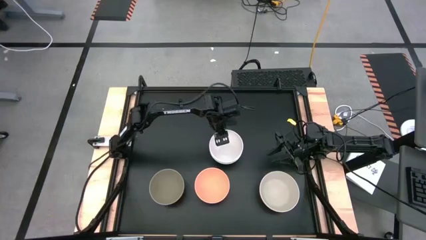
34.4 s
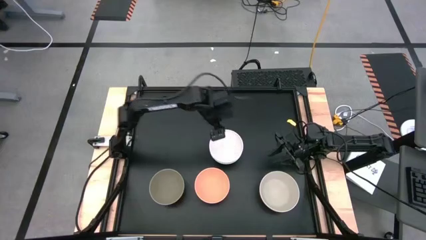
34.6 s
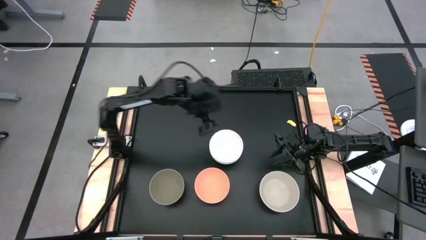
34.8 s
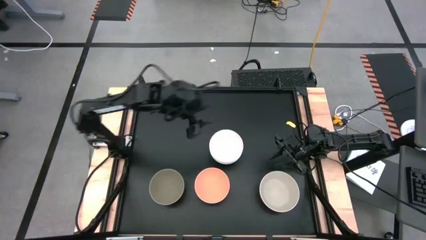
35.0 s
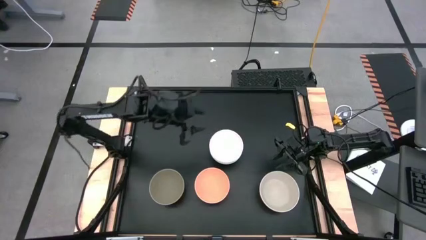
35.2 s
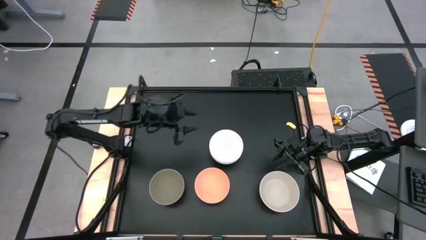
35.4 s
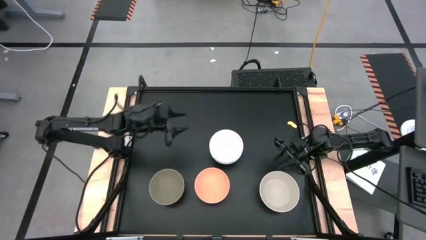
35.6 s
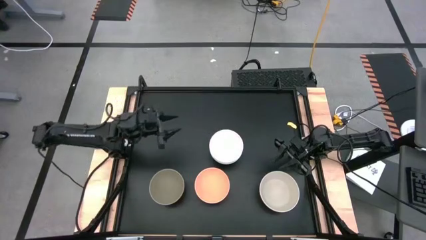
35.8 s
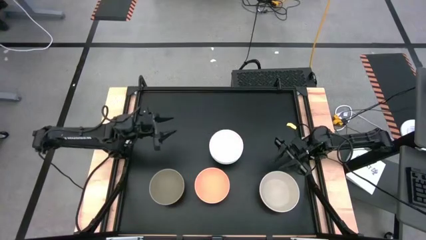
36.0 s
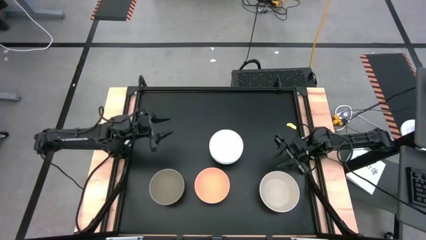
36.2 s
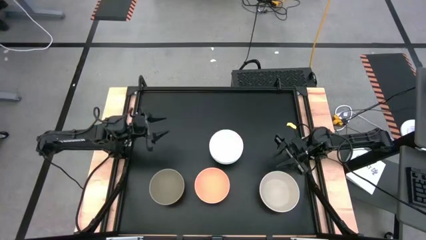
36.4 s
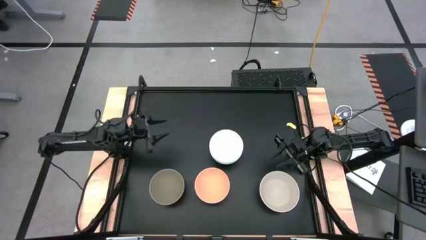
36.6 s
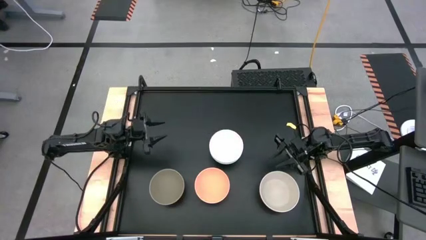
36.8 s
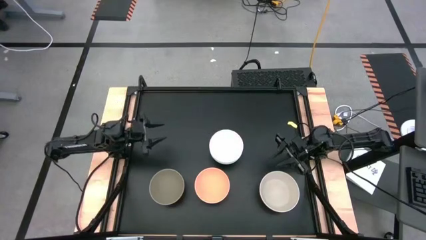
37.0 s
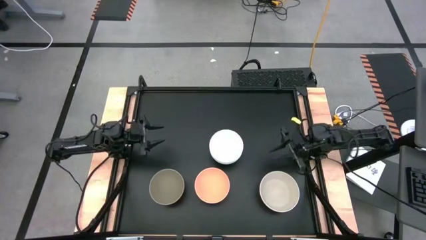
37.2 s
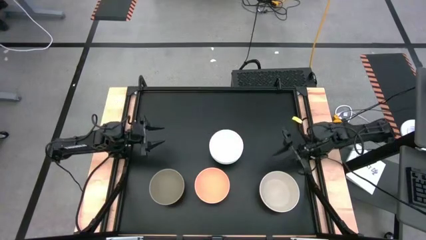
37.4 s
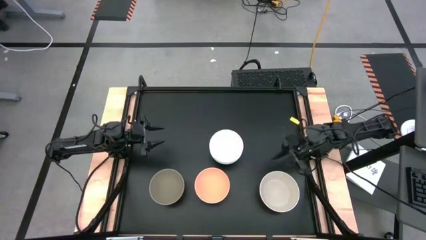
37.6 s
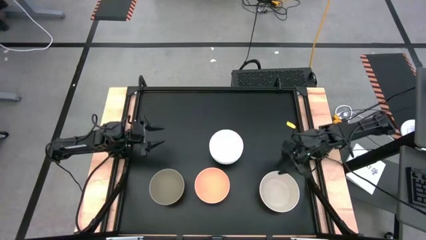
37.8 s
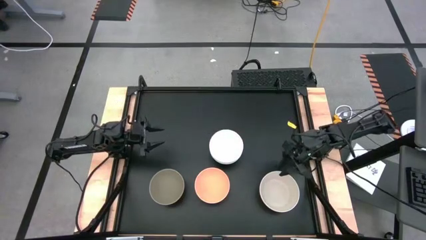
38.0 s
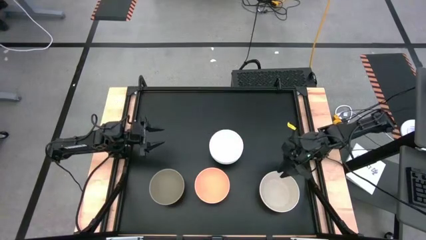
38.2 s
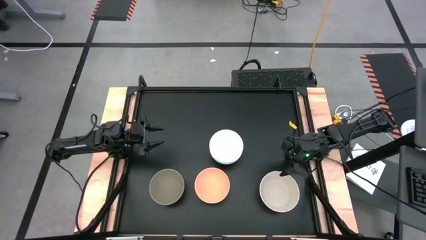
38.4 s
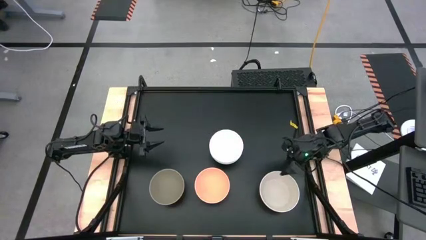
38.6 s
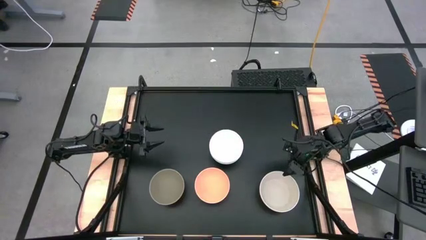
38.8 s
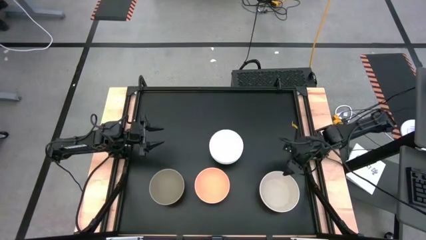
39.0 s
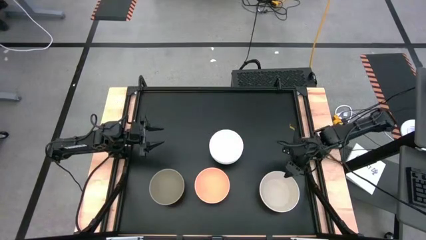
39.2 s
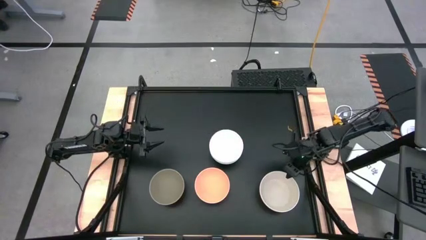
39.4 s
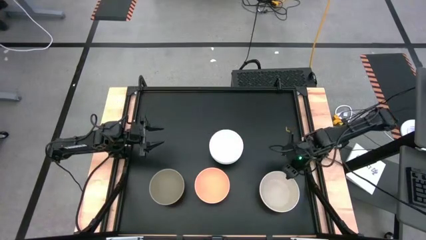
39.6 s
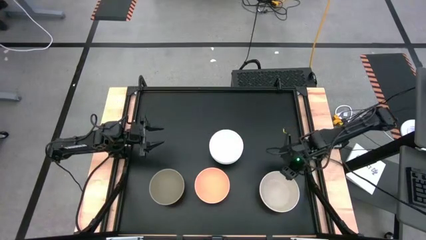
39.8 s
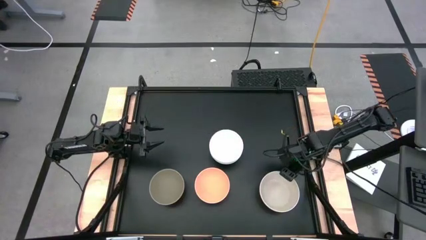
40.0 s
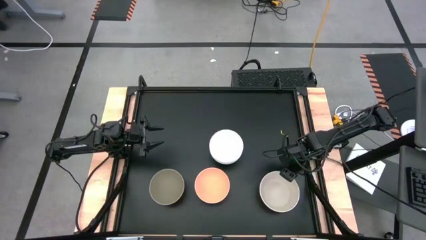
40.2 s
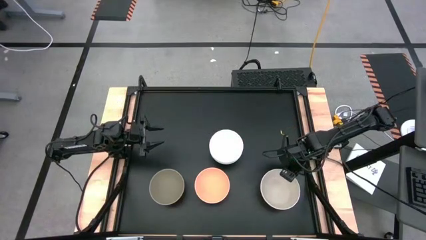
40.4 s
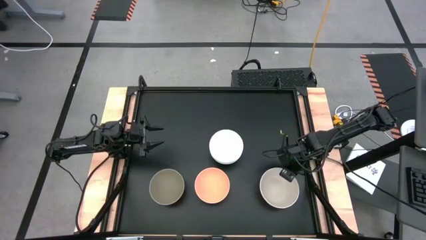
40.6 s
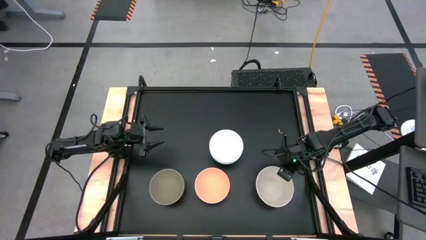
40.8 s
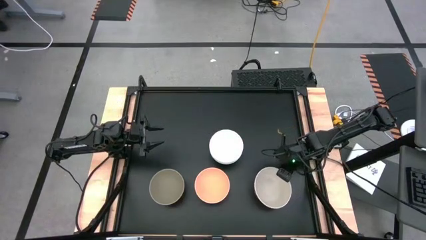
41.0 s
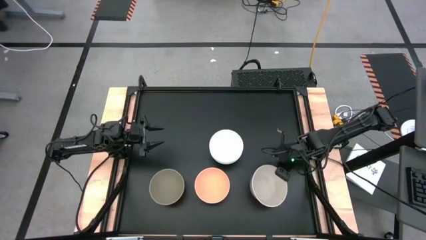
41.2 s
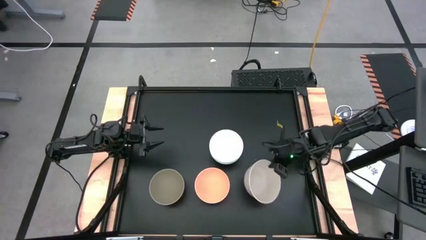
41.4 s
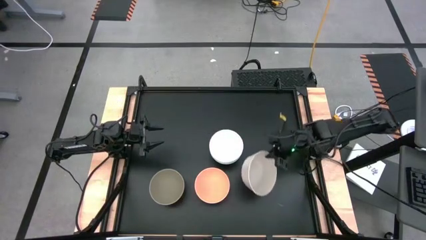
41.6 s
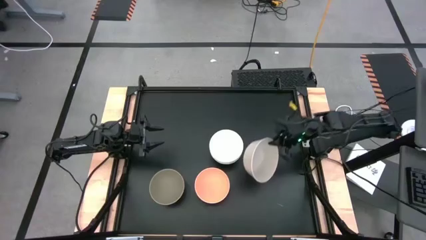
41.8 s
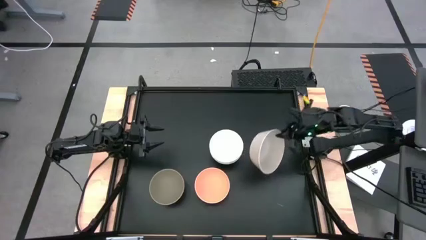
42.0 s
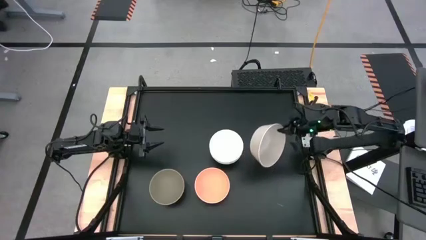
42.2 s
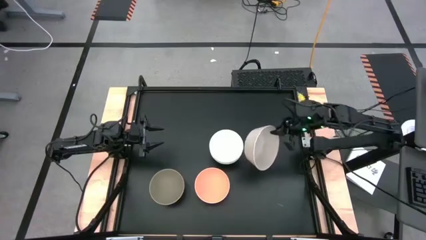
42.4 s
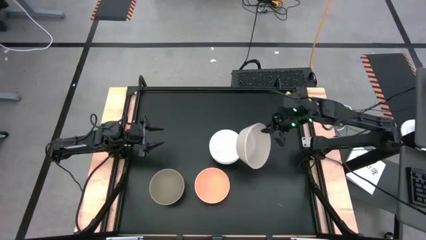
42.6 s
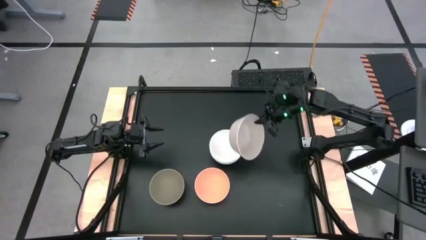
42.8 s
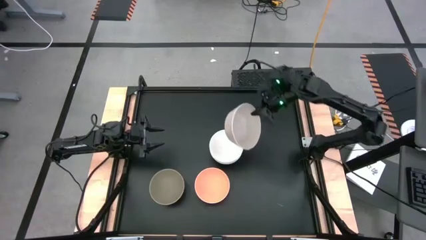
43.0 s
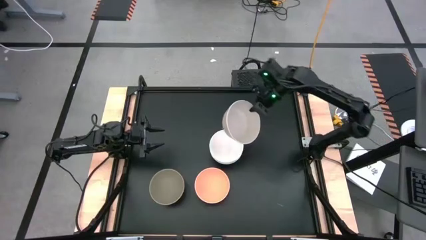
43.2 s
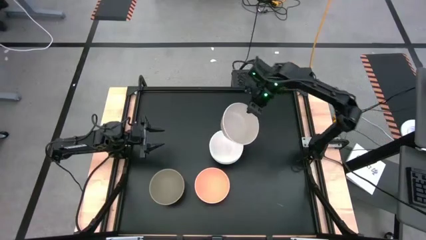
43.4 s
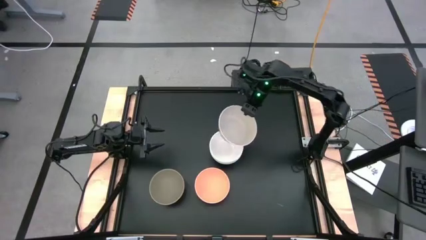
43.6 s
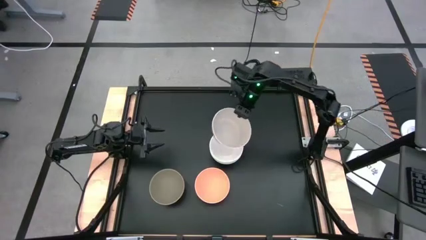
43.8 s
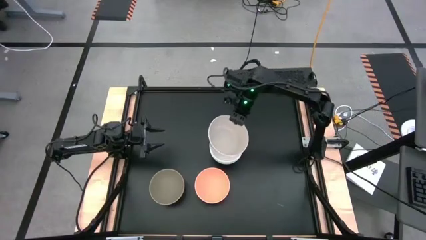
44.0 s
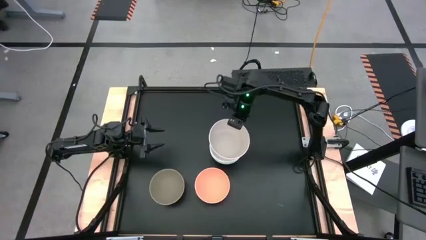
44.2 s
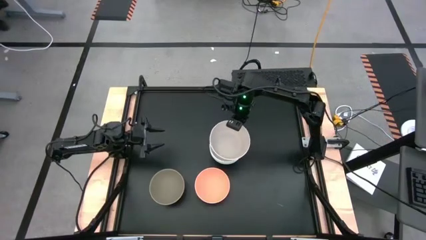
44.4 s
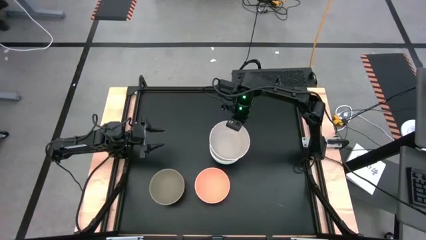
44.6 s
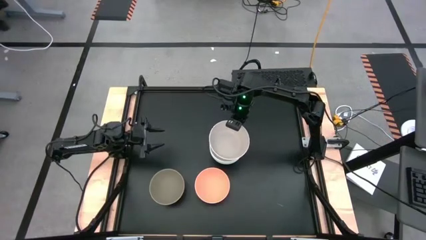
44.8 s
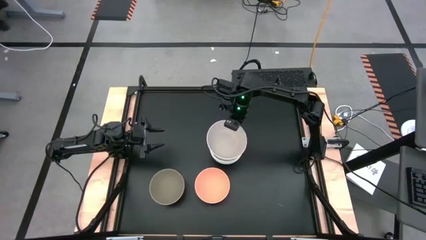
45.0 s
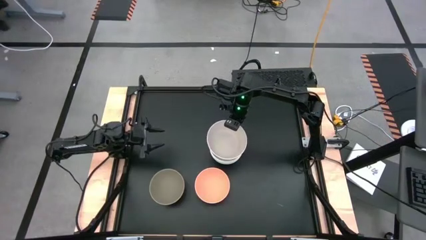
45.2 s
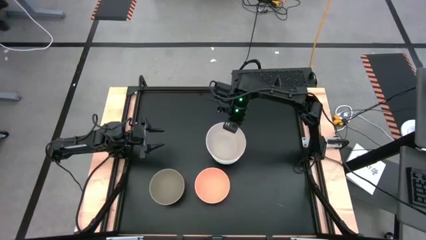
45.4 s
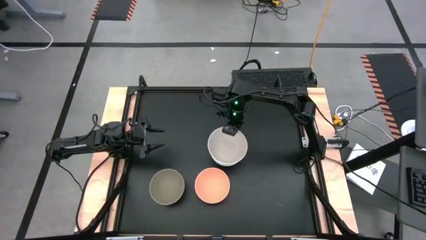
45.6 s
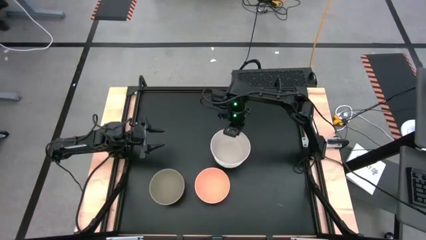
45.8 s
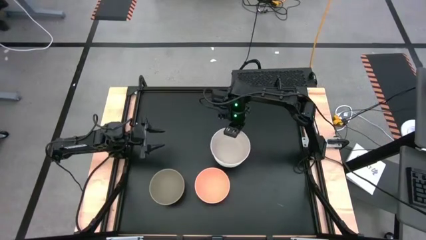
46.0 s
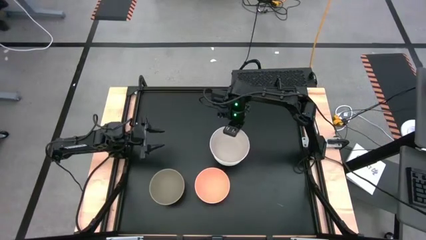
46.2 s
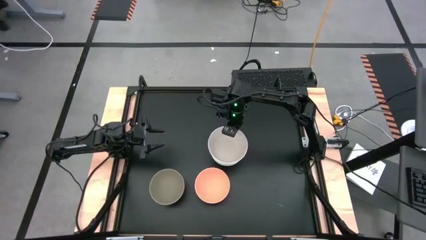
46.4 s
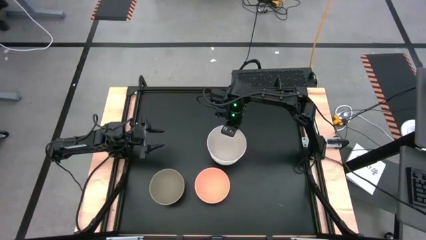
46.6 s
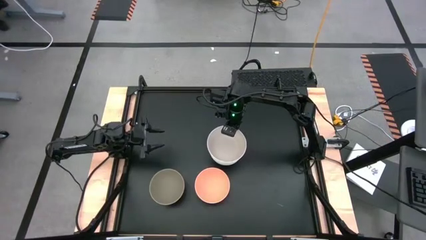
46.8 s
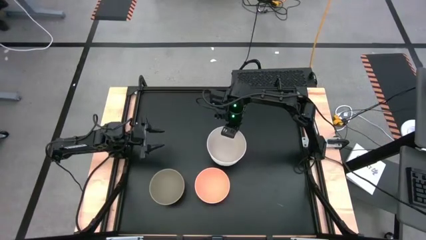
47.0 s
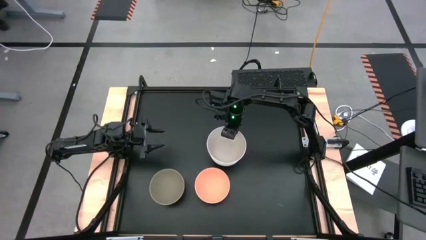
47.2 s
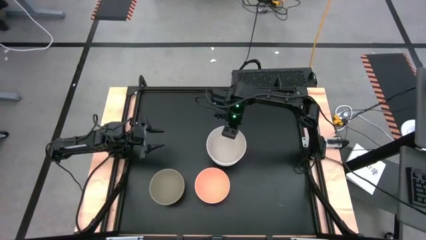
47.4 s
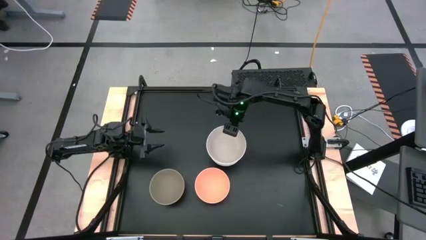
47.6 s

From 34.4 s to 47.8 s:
Task: Nest bowls inside each other
Stack the dirty white bowl on the white bowl

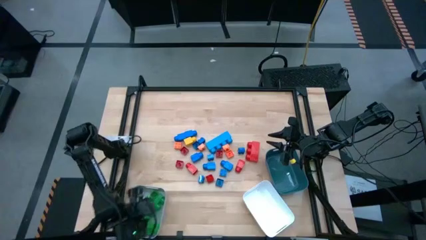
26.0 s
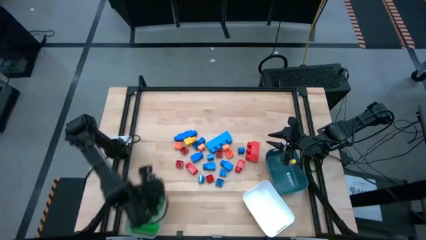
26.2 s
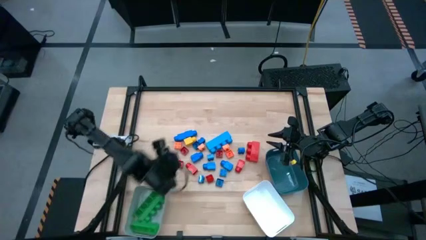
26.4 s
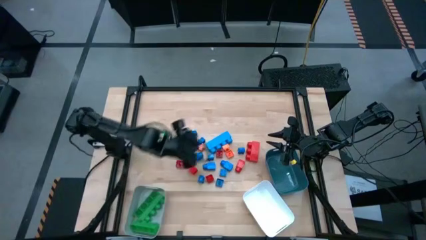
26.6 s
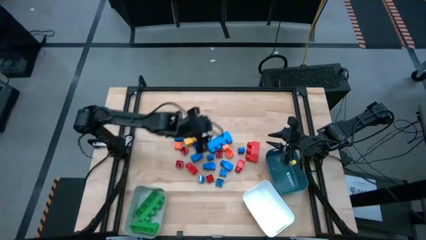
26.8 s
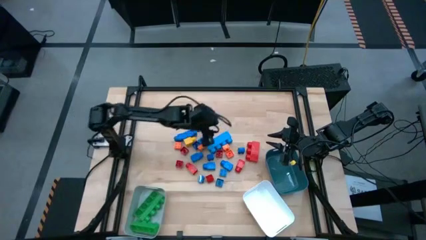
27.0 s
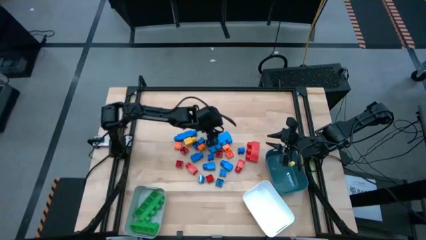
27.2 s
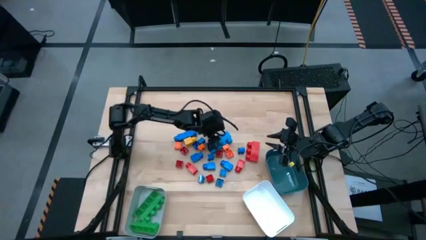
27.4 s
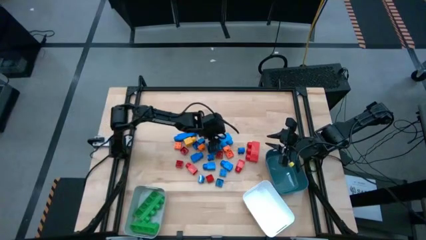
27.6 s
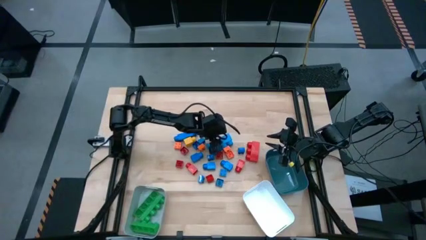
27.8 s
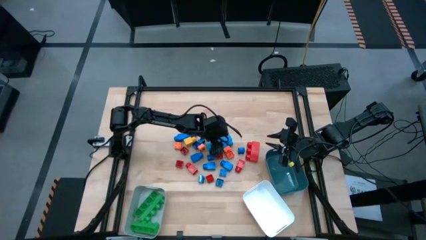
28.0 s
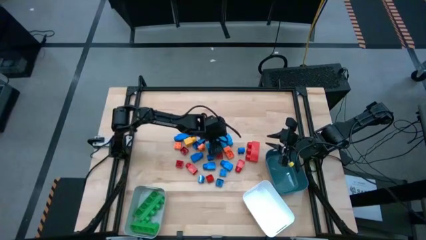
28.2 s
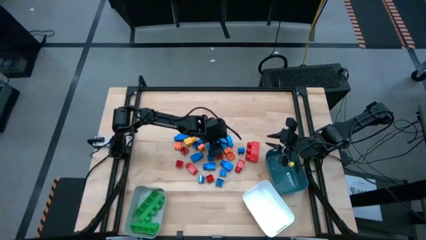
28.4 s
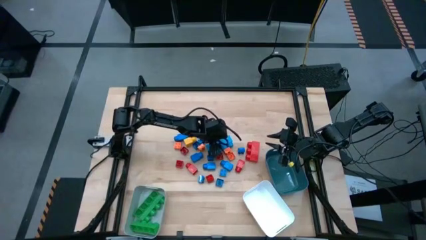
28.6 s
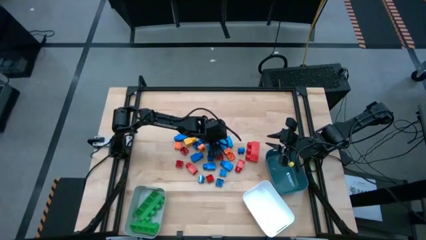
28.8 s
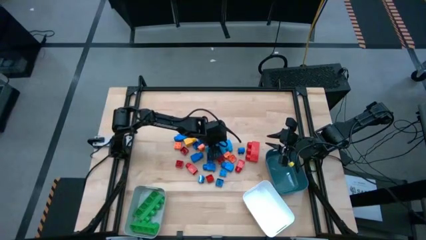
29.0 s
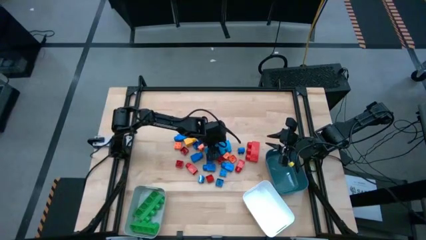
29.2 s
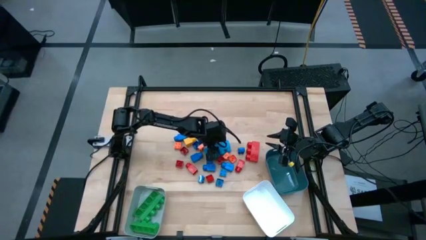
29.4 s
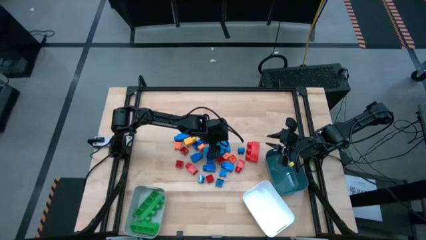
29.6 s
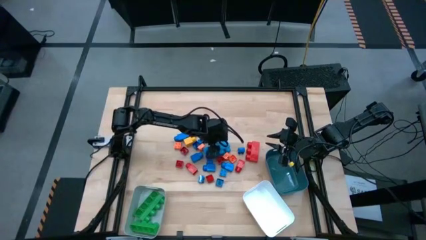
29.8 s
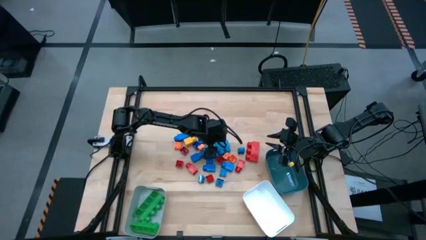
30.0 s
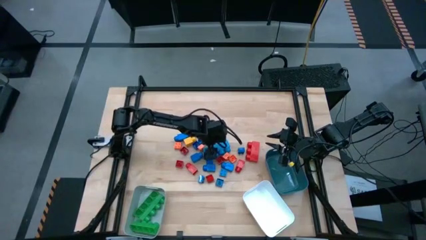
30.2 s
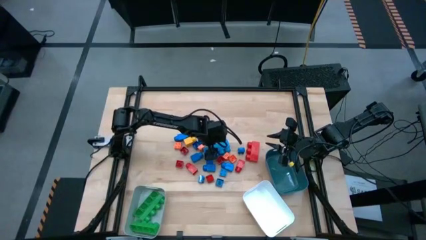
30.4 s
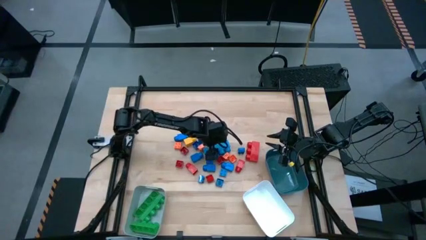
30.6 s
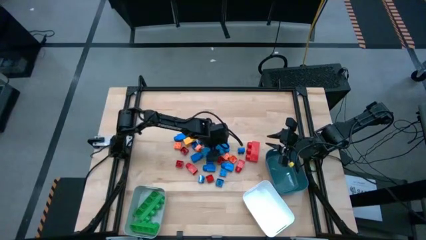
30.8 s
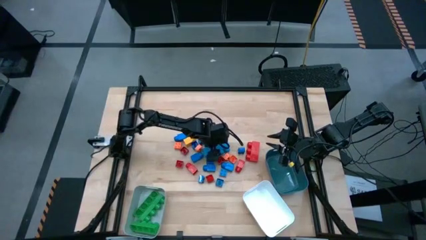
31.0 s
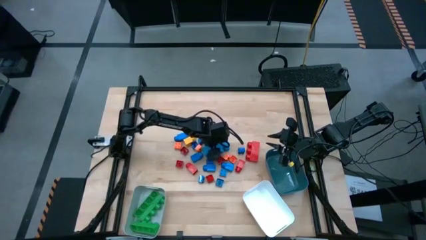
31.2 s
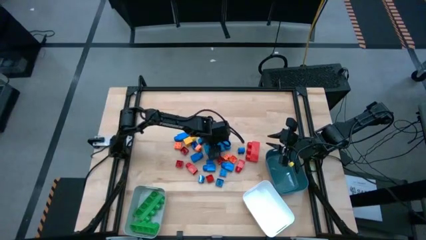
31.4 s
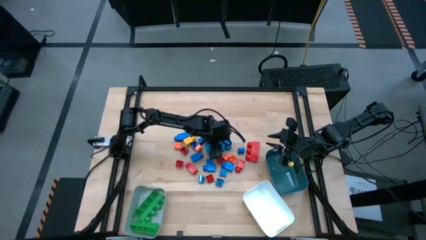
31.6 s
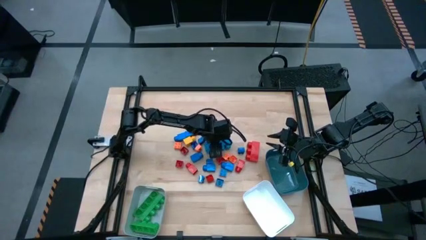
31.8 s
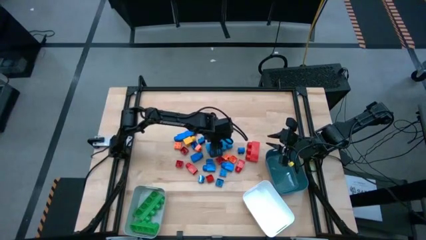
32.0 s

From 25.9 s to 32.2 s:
Task: Sort blocks by size
Put the rectangular blue game piece into the gray bin
